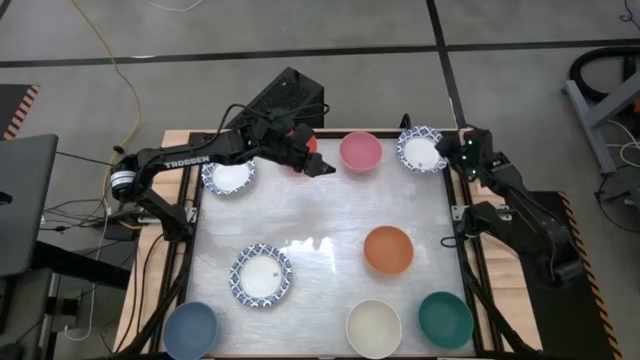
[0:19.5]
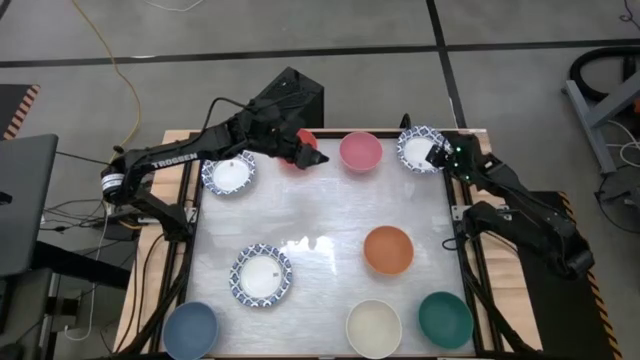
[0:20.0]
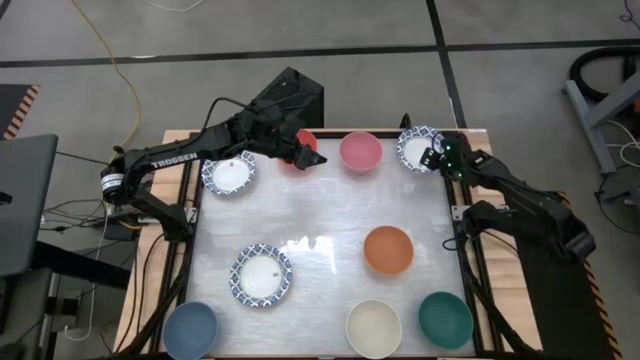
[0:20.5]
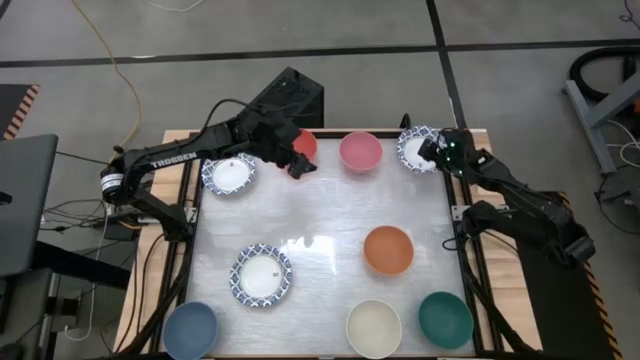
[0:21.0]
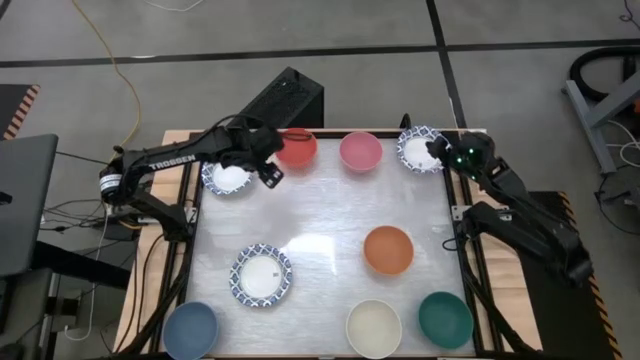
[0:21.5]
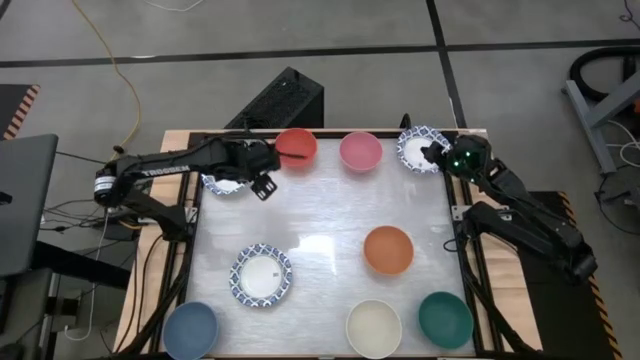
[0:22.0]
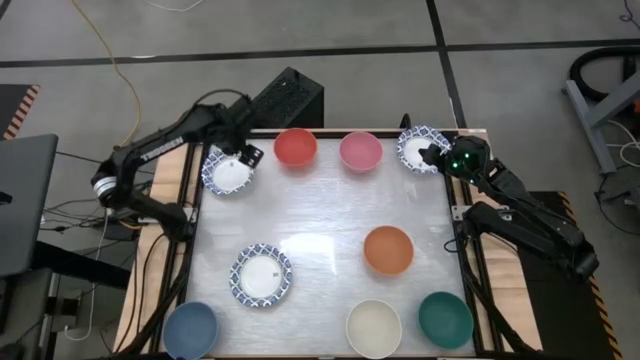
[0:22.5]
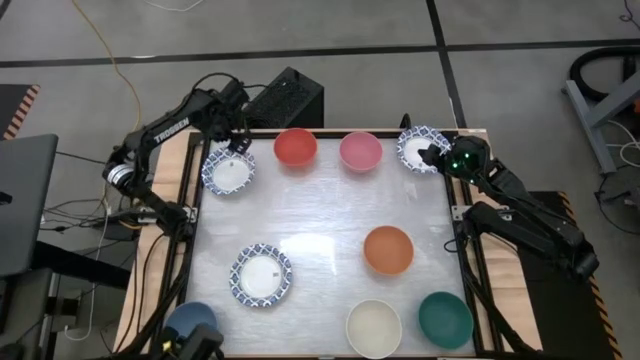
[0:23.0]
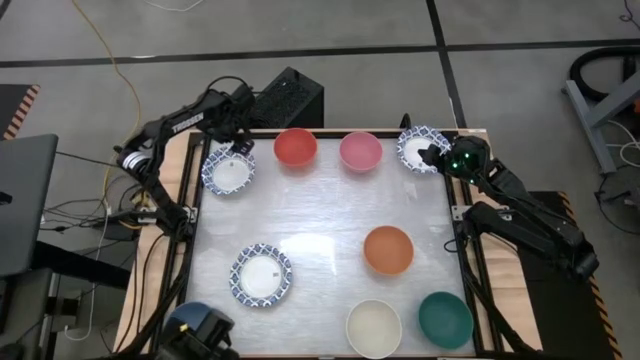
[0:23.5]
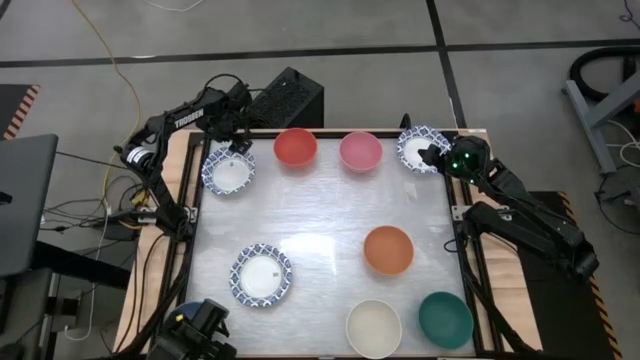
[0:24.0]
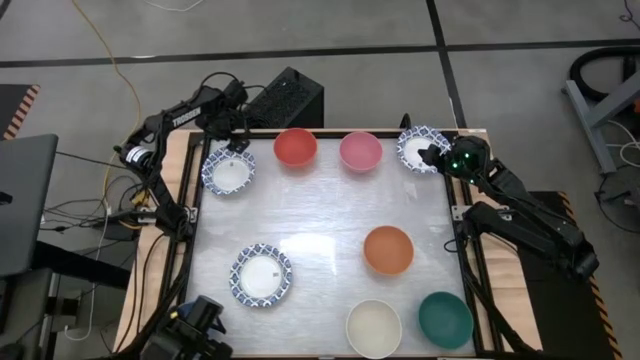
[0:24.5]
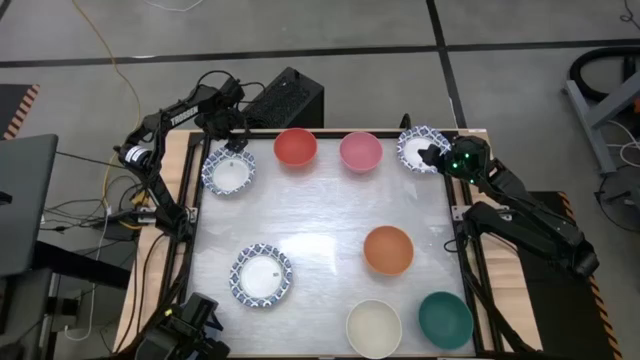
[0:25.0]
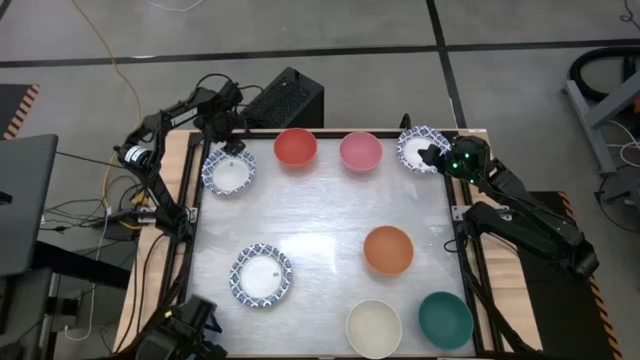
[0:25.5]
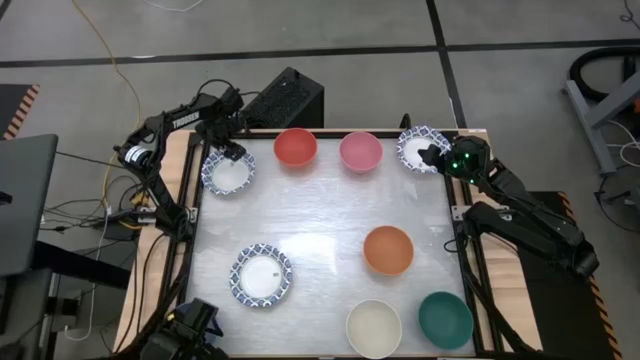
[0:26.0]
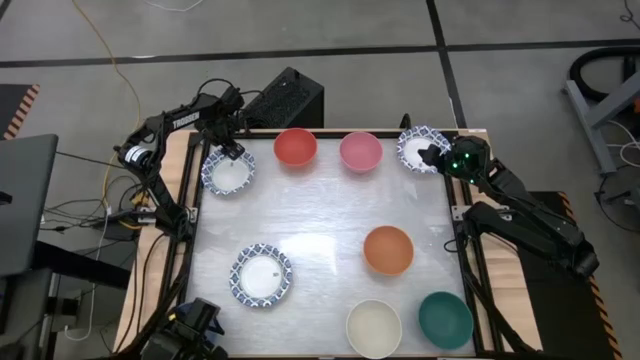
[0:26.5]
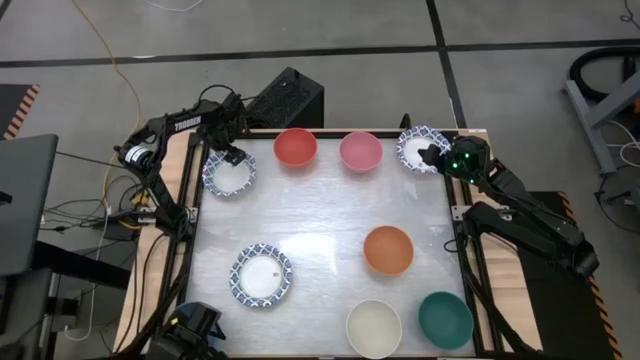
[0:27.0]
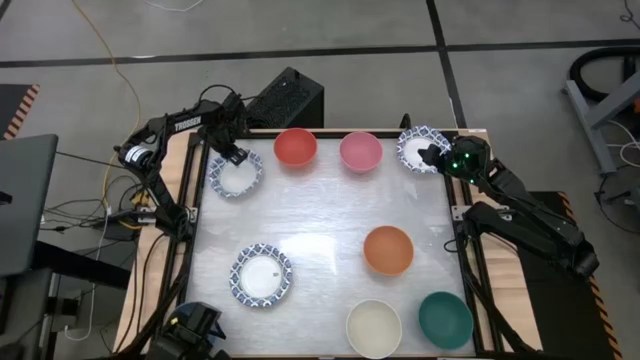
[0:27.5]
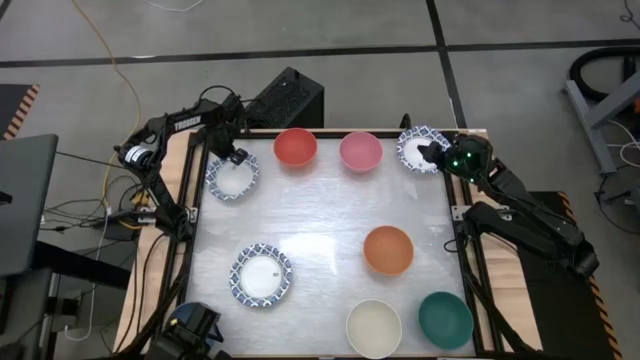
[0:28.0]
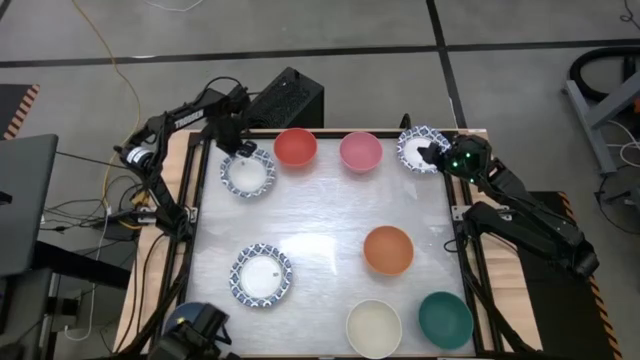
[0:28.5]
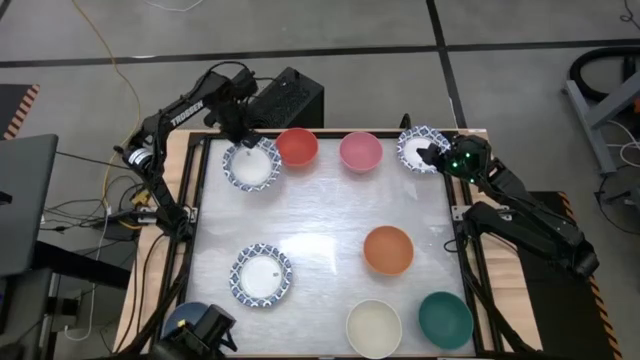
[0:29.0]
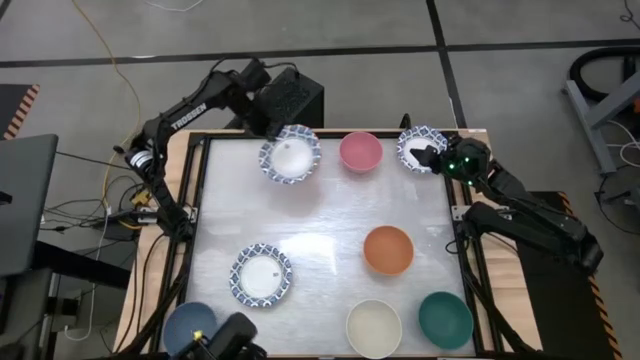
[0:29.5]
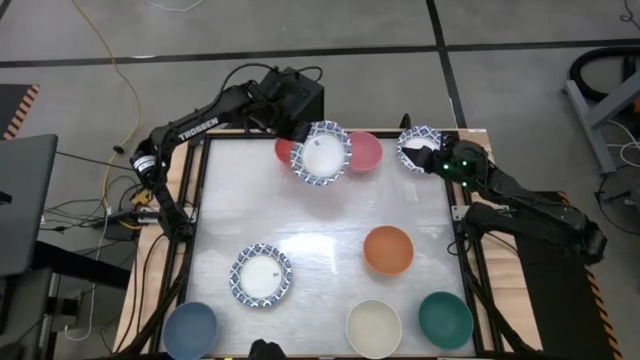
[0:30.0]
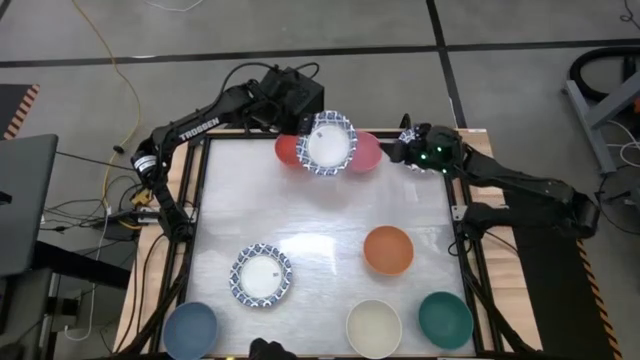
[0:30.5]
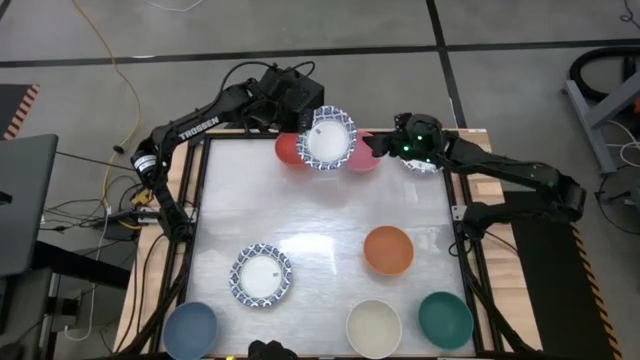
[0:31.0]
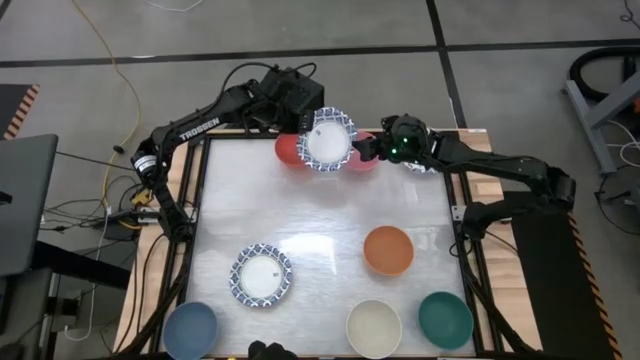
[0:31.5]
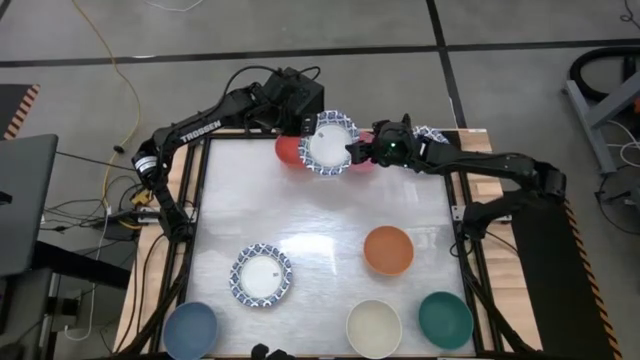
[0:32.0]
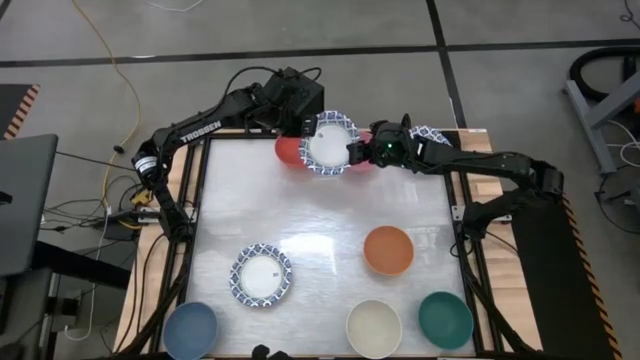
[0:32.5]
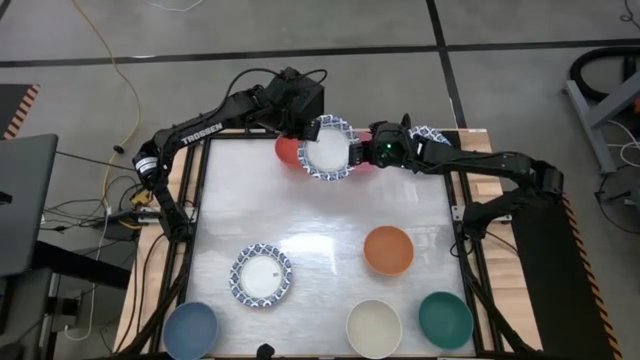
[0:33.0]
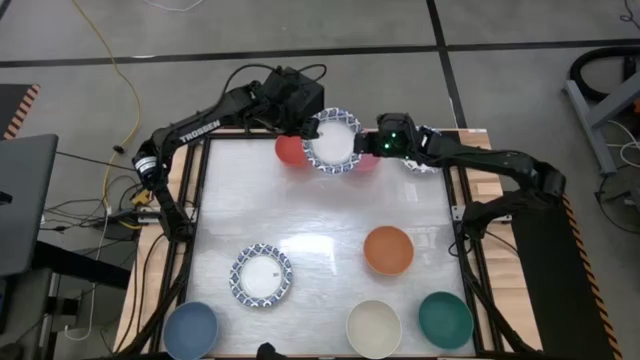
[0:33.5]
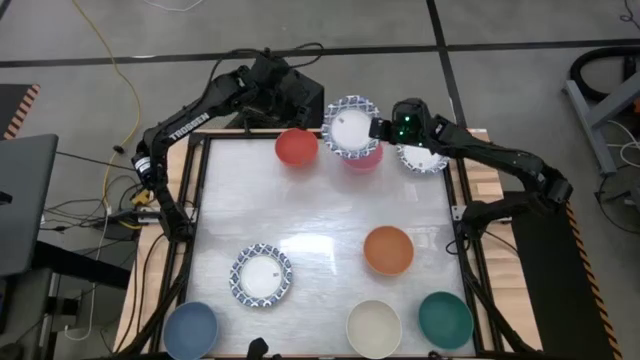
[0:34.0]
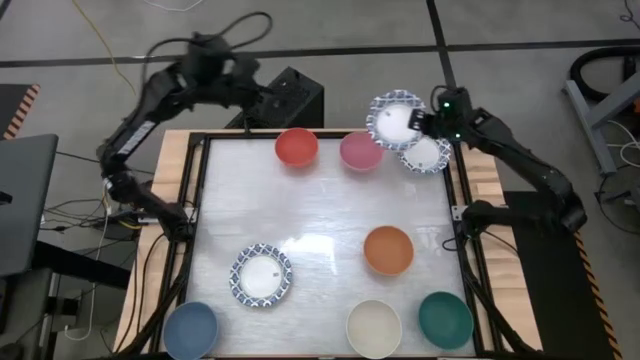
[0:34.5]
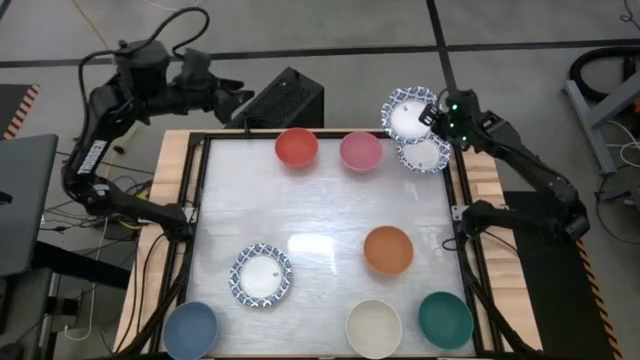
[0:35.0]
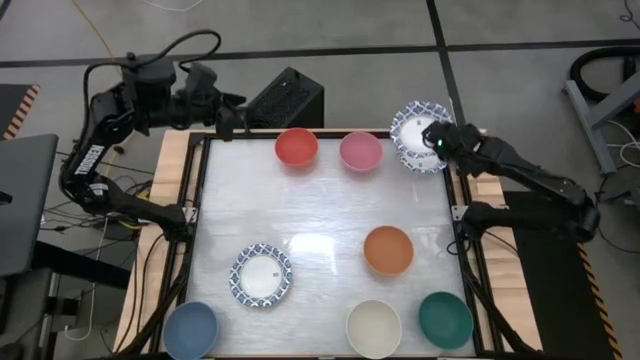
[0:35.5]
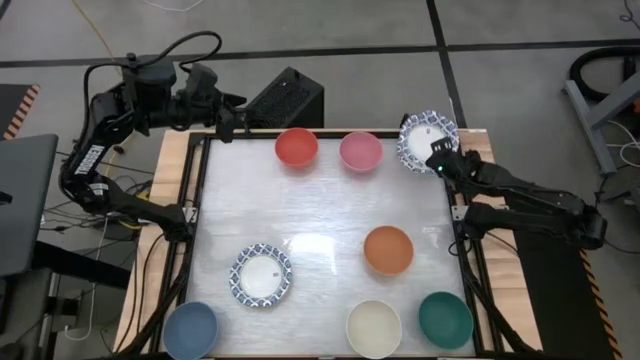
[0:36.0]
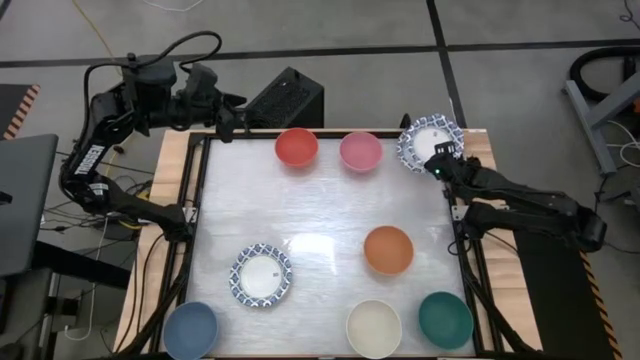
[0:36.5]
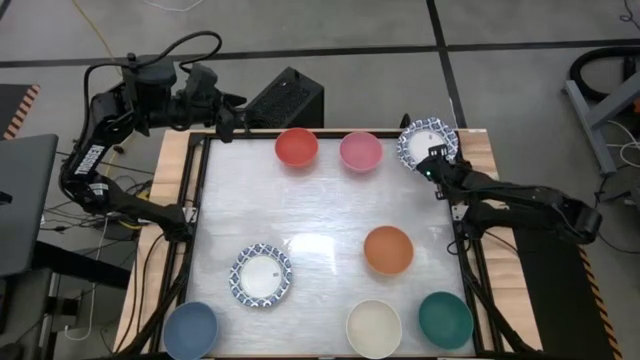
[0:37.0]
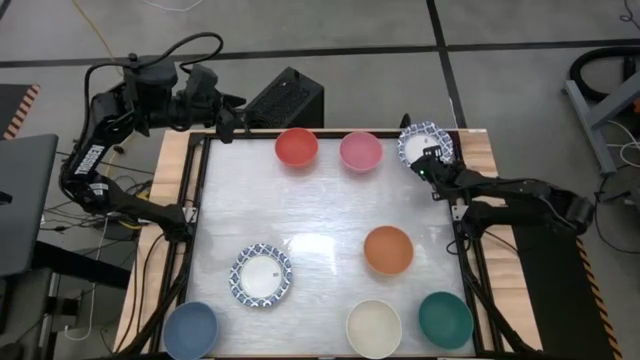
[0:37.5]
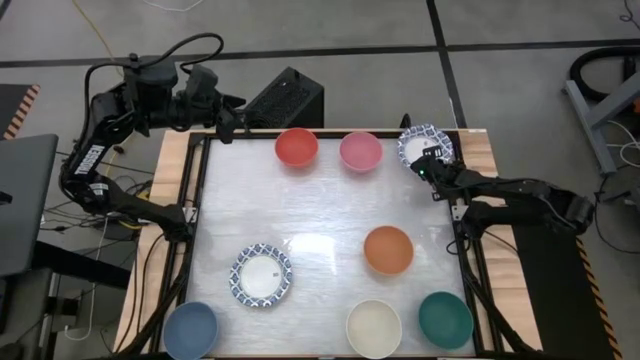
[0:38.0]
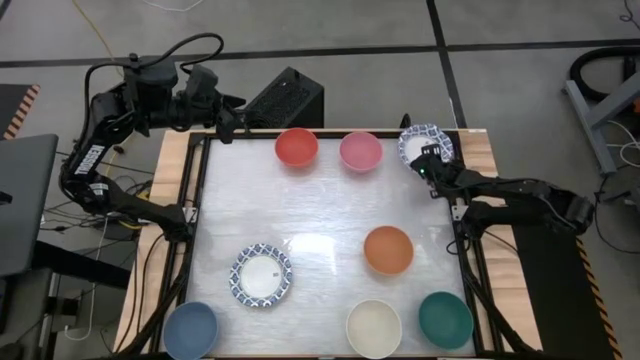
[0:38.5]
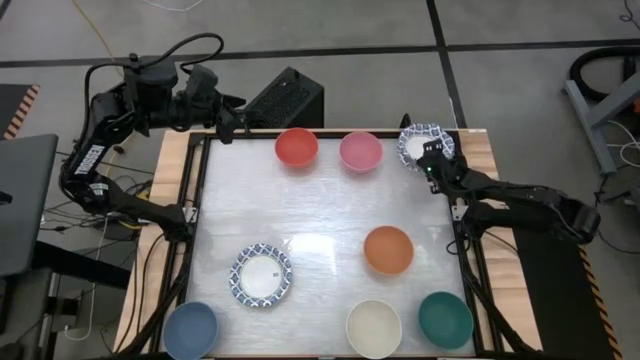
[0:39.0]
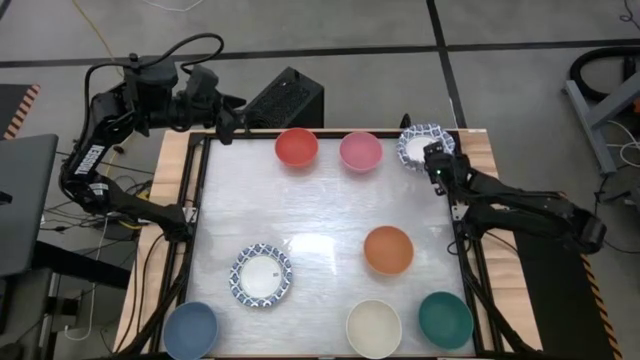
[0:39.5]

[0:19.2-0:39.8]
Stack the blue patterned bowl on top of the blue patterned bowl
